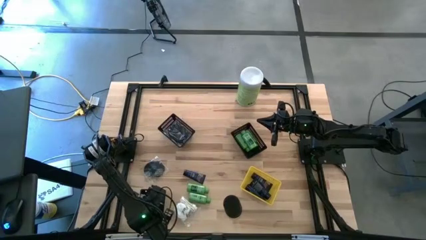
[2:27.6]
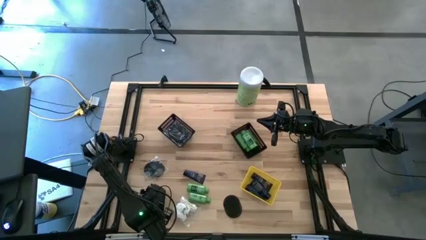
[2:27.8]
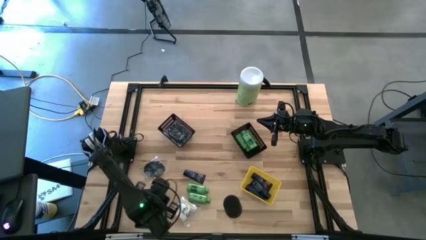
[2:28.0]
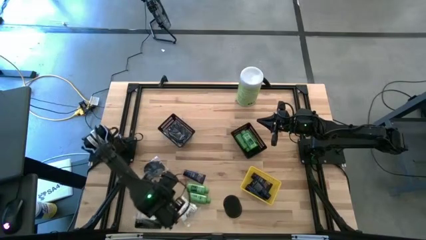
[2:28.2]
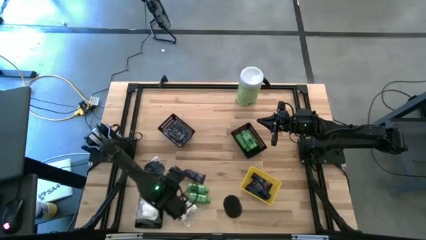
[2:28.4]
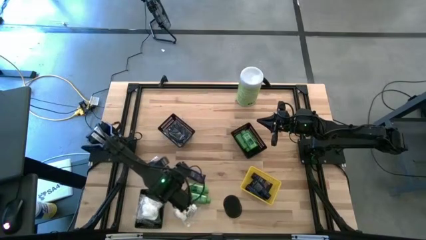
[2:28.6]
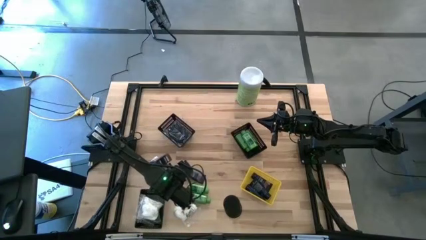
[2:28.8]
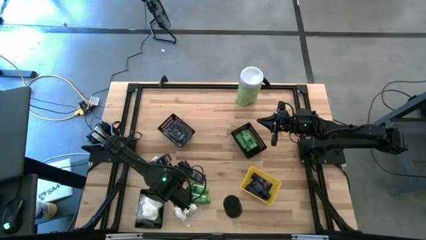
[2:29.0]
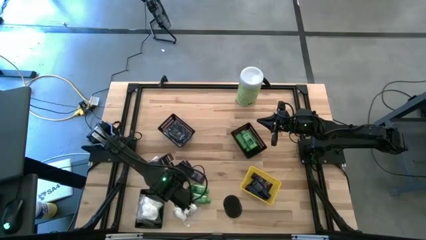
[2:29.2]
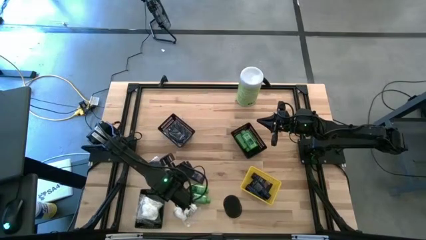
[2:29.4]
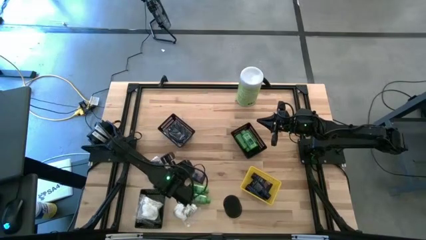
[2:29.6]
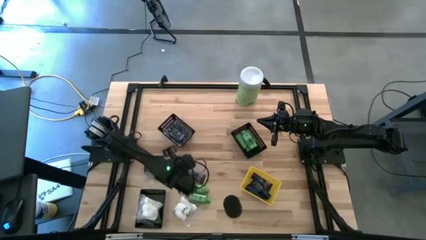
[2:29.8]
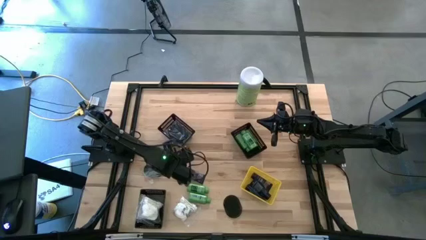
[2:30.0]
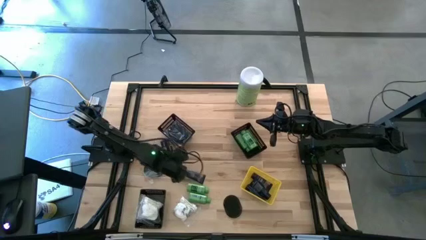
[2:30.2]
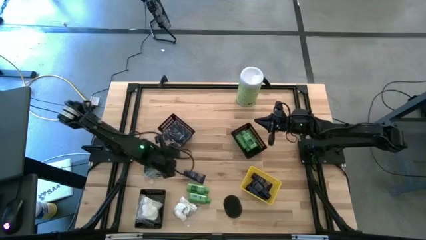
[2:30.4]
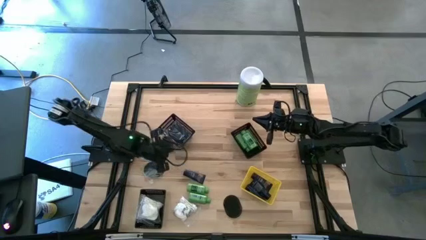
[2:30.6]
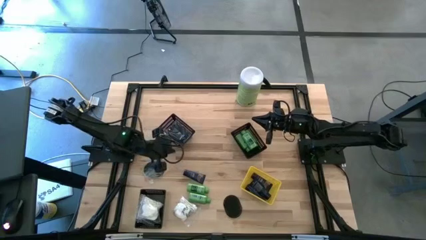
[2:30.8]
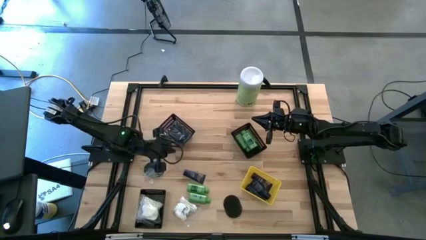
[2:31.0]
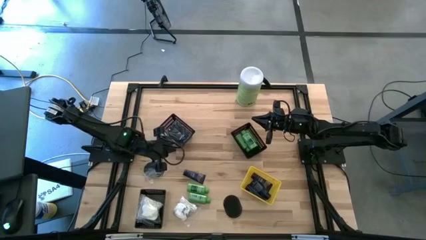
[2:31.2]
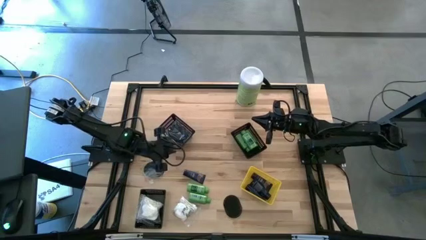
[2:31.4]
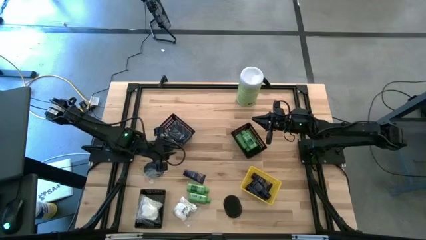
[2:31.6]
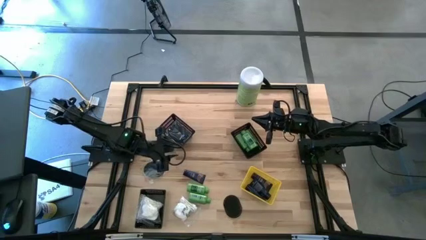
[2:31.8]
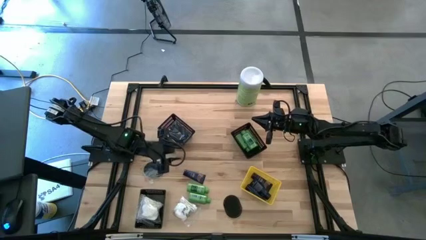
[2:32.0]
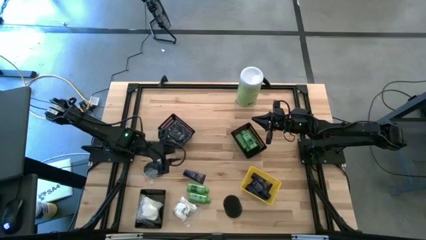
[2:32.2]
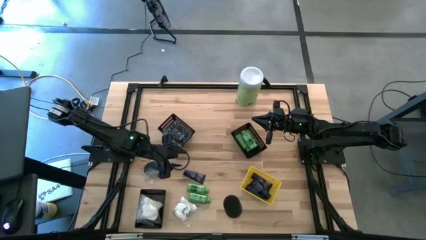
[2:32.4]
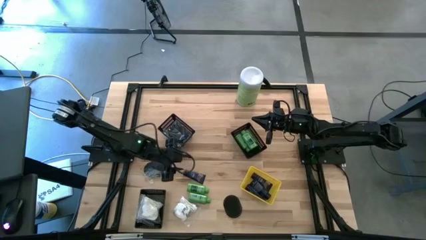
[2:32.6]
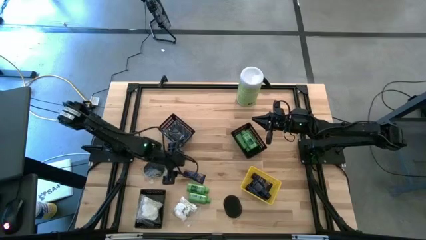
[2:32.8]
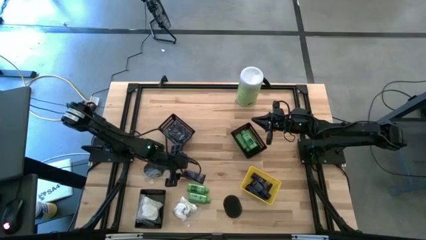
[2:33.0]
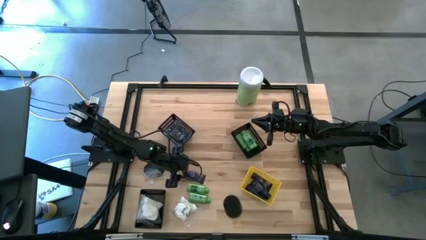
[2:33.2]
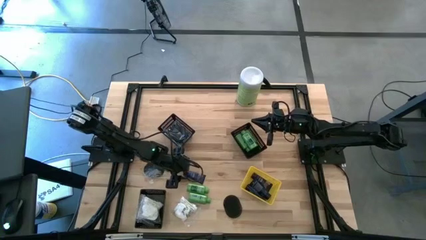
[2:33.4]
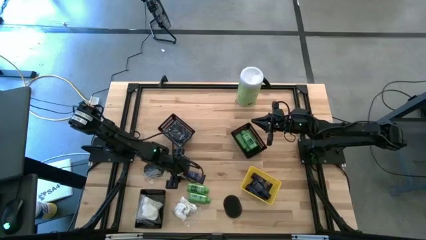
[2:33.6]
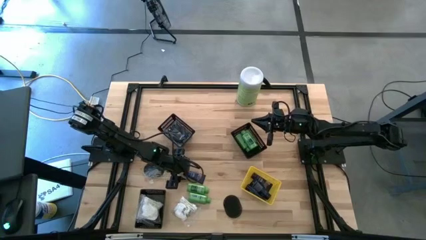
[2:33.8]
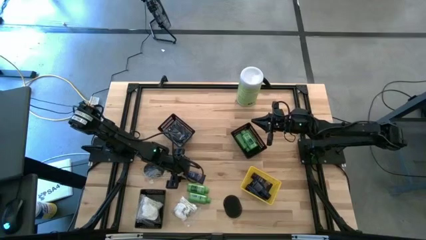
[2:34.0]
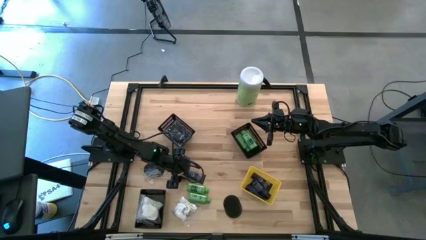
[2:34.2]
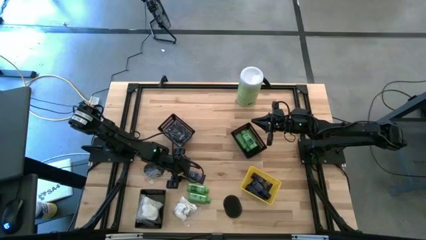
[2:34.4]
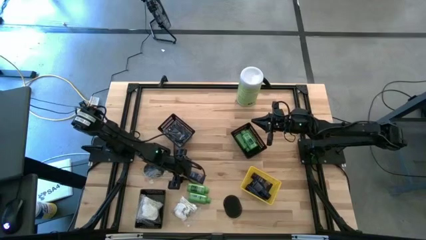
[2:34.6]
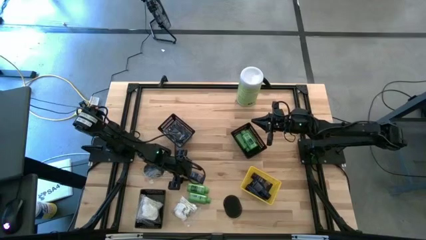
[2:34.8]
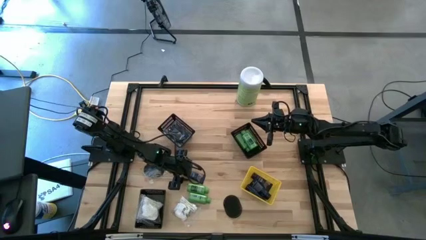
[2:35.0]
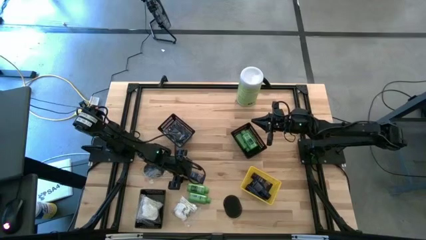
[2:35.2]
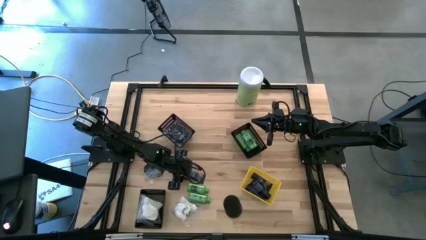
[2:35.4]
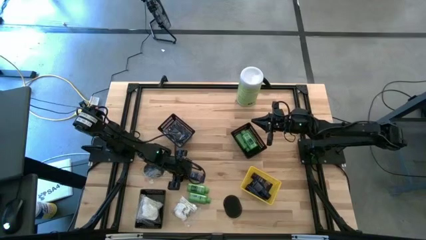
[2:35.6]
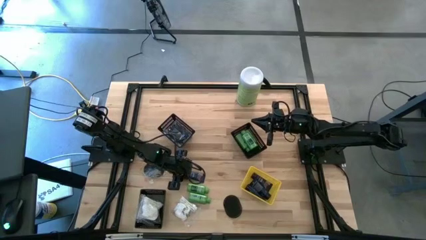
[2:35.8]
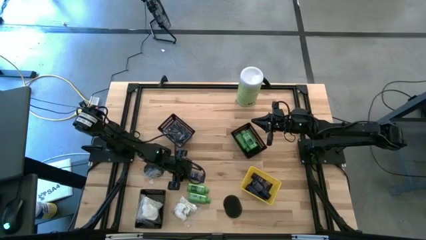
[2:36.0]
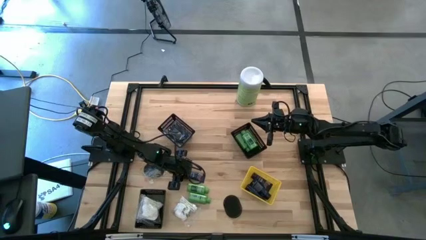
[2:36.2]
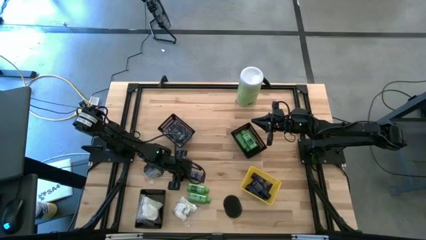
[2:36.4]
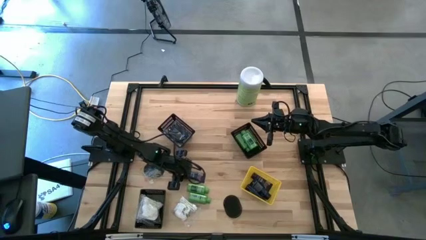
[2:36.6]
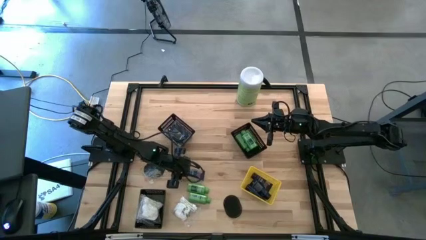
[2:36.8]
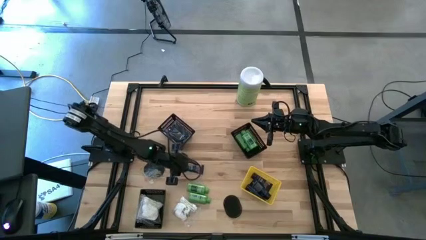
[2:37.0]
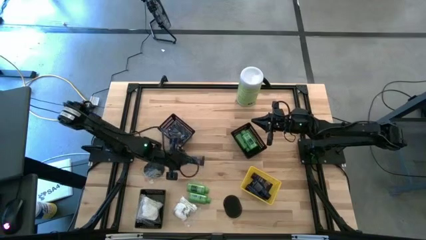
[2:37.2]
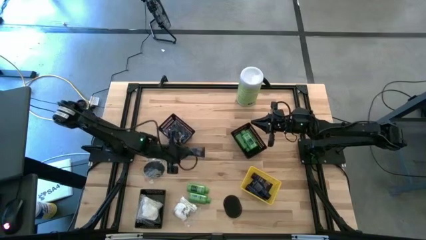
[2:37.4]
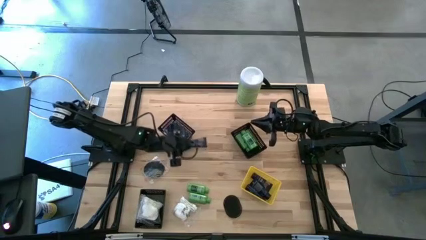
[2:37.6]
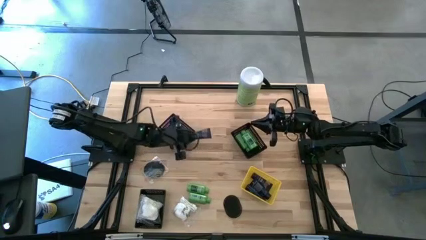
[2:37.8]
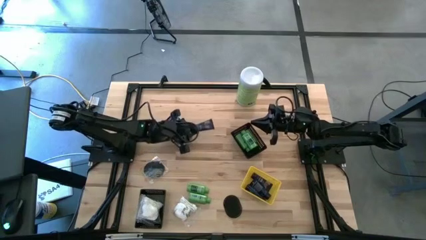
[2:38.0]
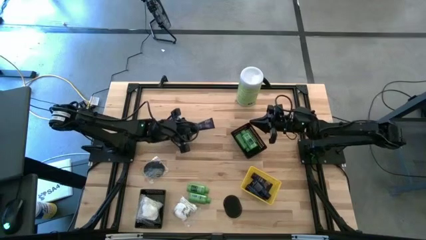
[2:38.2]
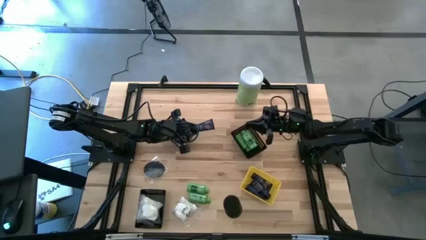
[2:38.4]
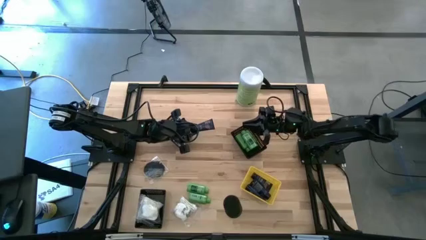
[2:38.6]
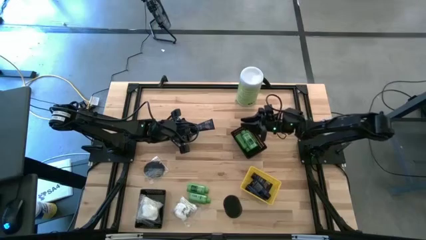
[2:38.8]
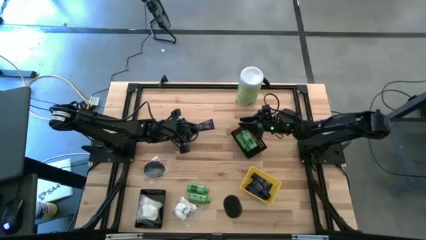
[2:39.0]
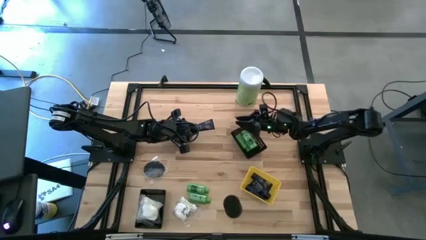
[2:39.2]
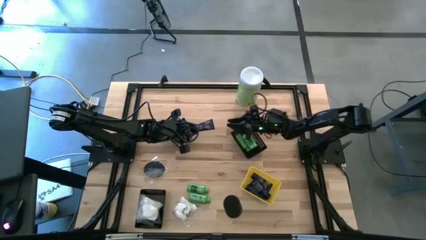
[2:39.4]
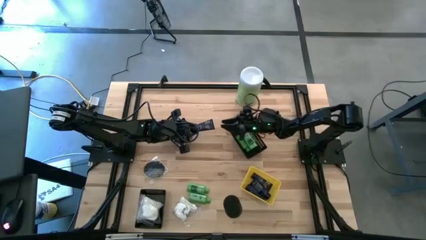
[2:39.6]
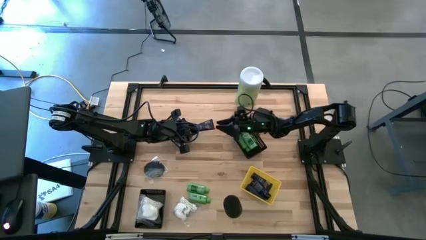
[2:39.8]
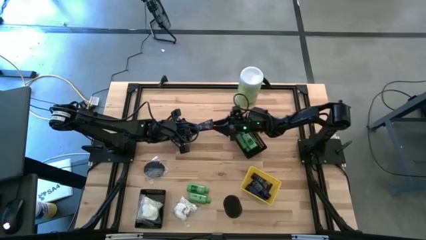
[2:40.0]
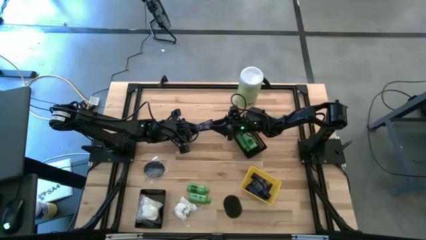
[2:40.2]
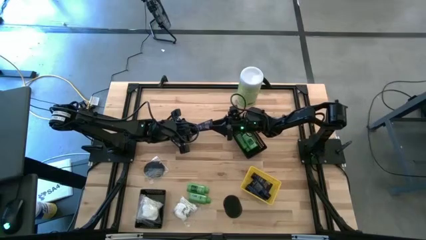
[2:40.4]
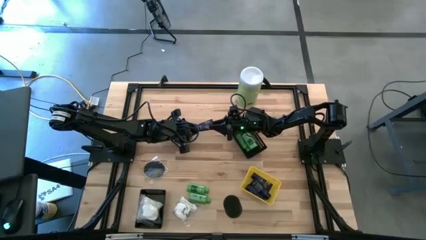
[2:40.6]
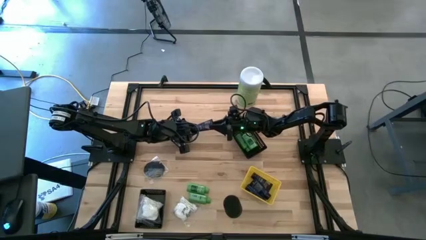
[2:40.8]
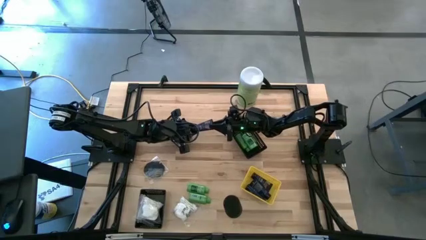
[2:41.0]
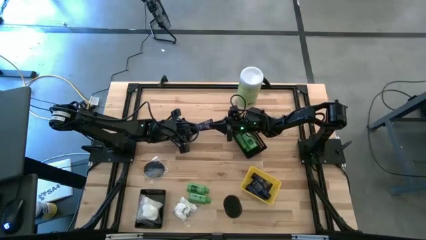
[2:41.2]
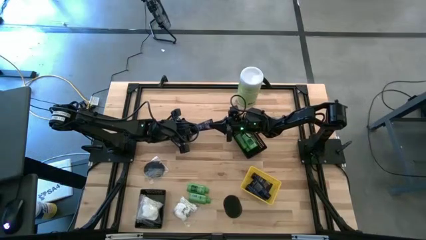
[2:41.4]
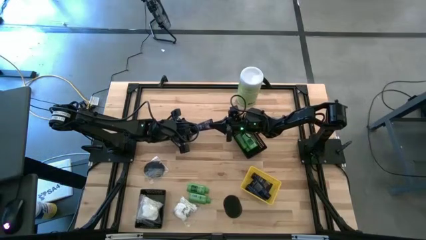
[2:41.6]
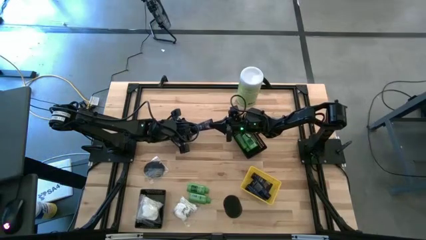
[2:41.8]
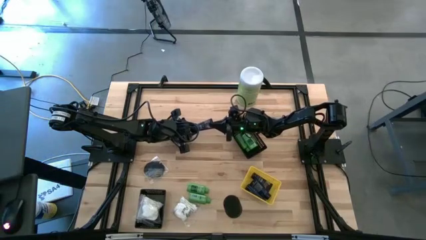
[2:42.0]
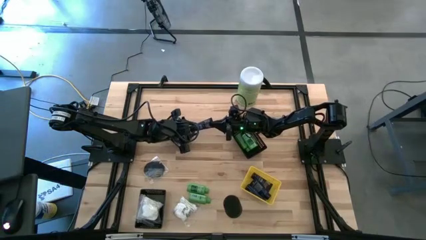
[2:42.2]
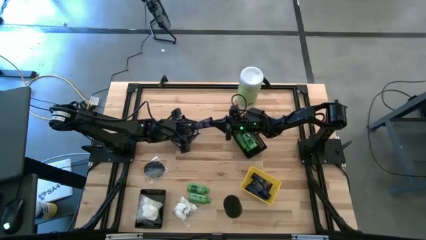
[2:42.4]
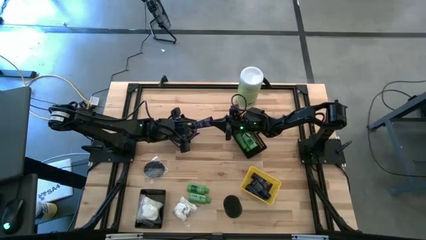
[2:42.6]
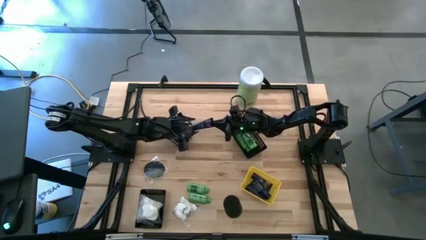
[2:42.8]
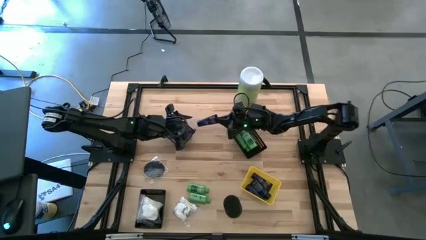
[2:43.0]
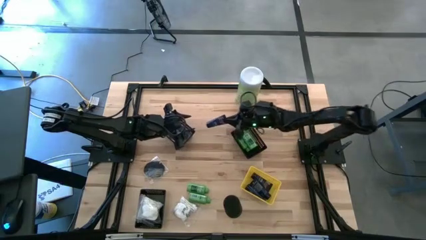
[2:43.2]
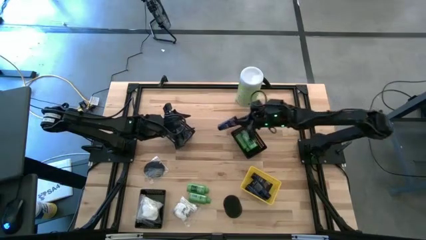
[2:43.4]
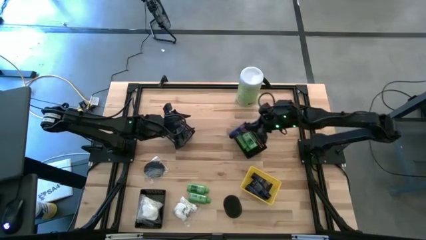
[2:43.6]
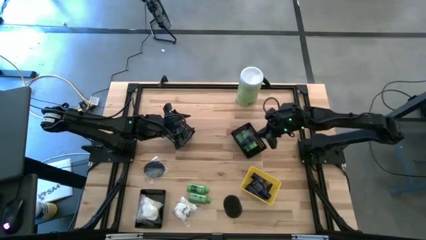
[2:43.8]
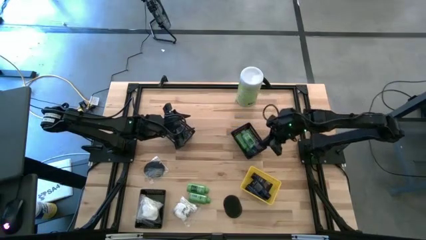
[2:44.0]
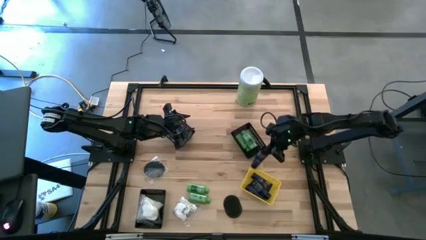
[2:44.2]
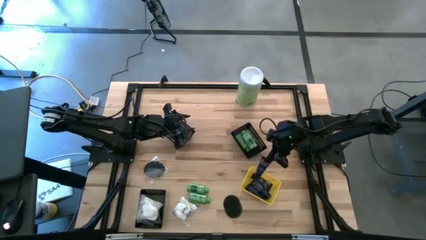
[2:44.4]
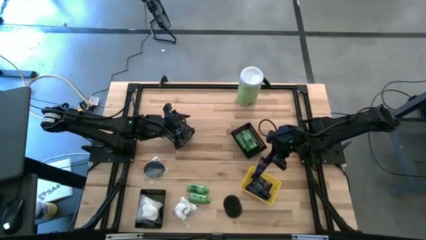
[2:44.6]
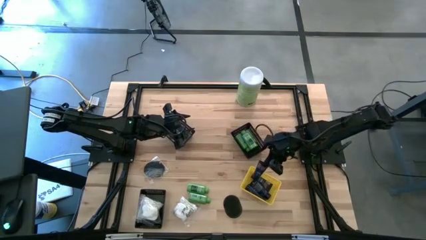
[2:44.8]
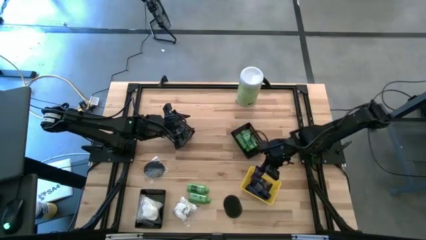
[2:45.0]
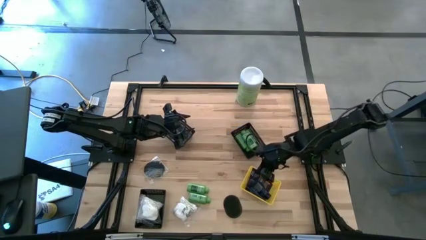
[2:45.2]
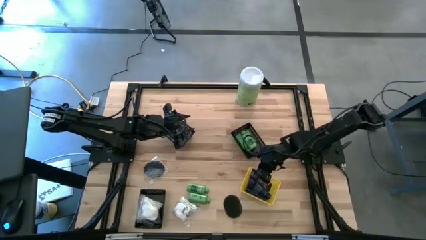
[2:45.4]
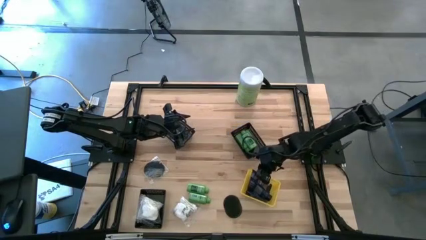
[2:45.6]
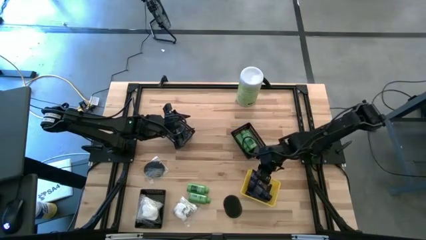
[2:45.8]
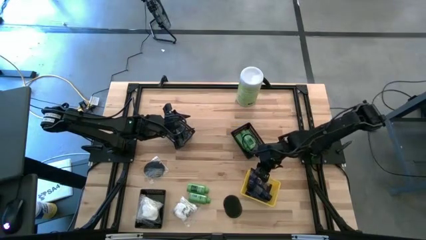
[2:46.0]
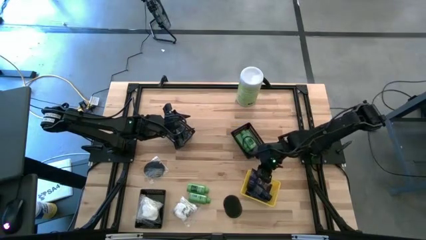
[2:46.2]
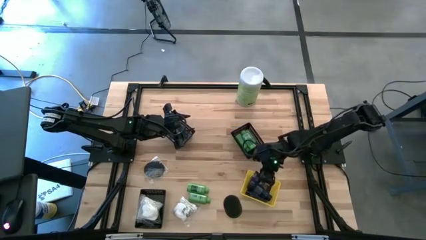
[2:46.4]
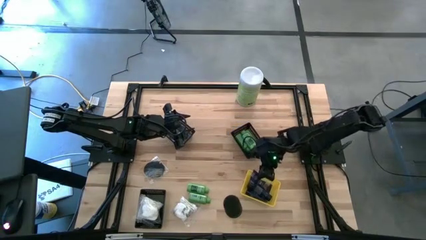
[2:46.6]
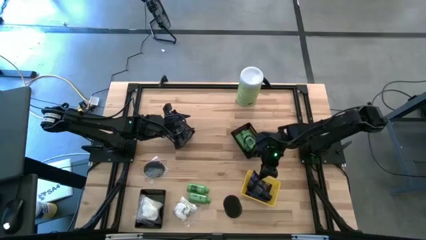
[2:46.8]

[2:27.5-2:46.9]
Task: Pick & Place Travel size toiletries
Put the shaving cream tube into the yellow bin
